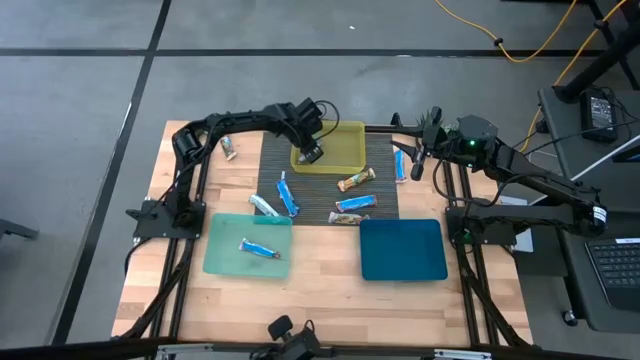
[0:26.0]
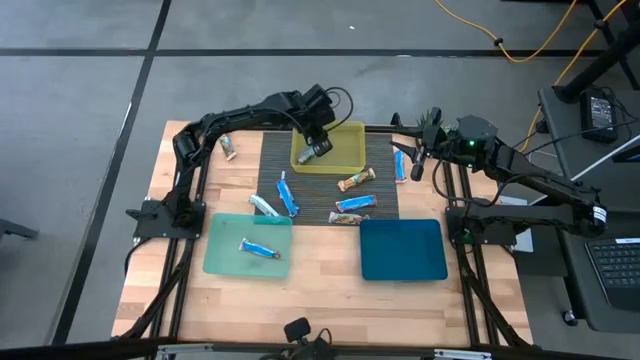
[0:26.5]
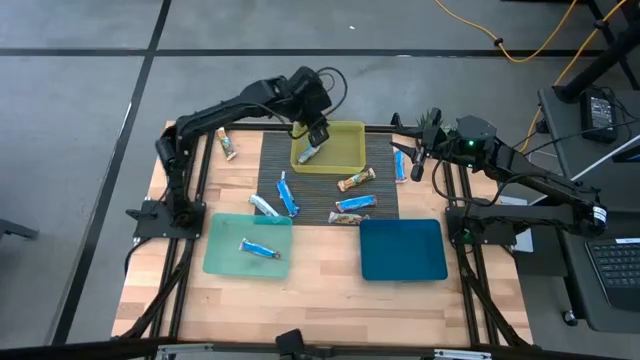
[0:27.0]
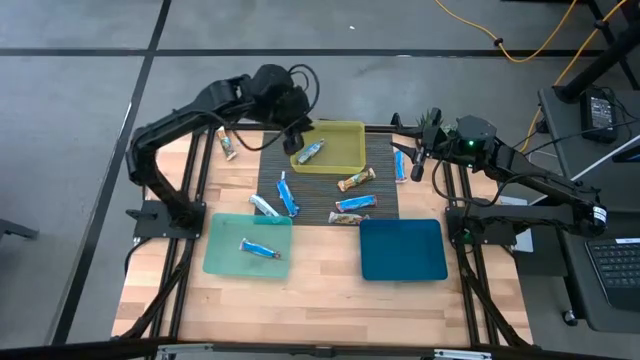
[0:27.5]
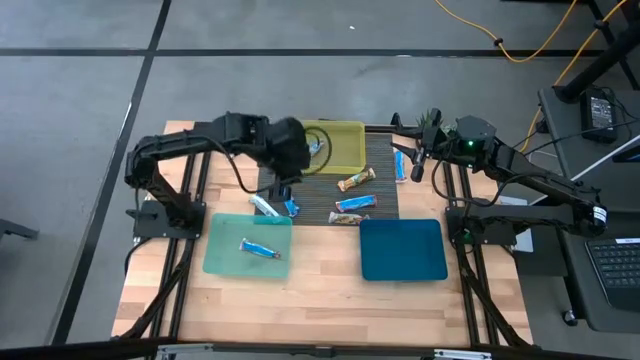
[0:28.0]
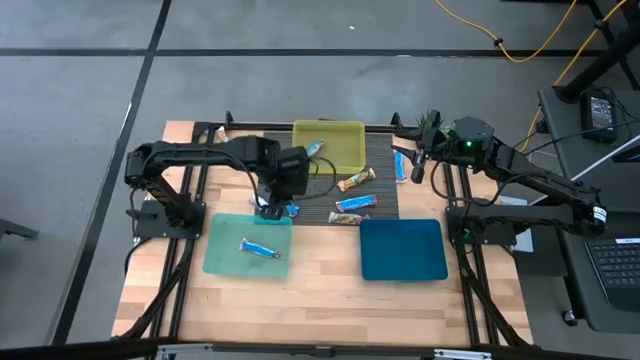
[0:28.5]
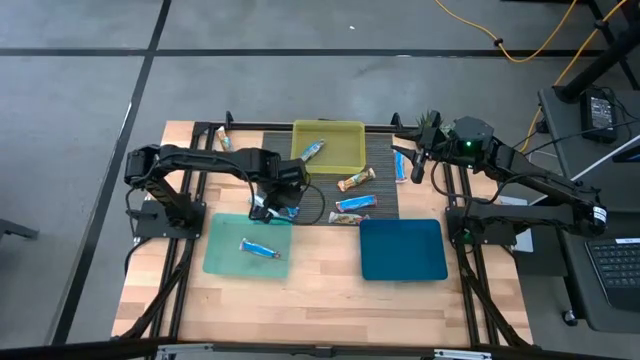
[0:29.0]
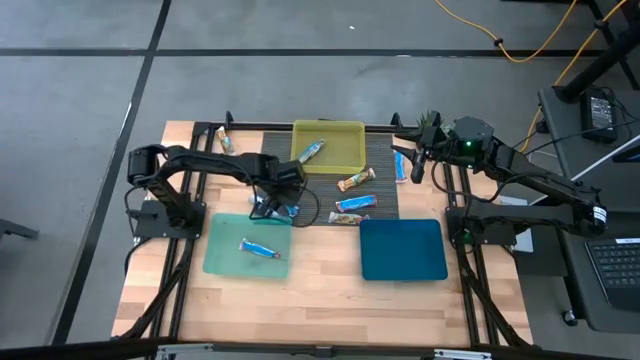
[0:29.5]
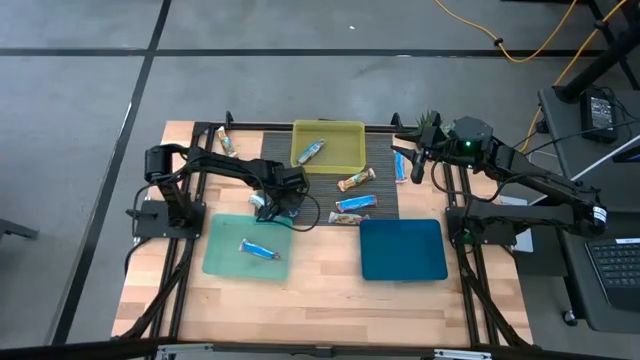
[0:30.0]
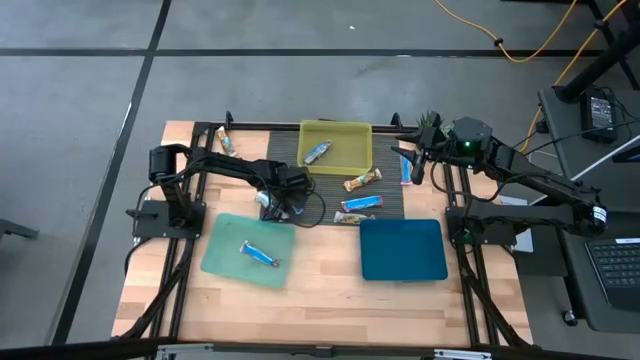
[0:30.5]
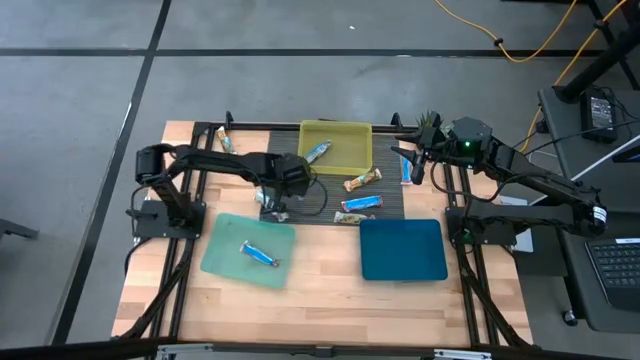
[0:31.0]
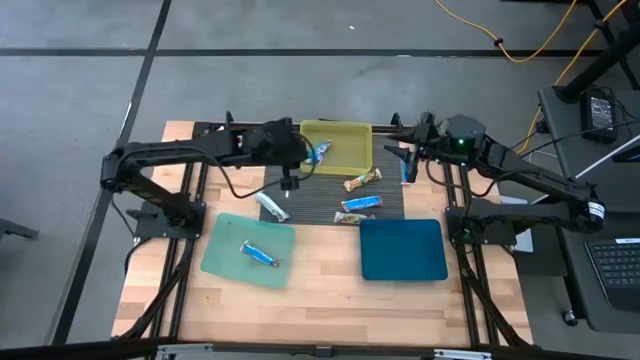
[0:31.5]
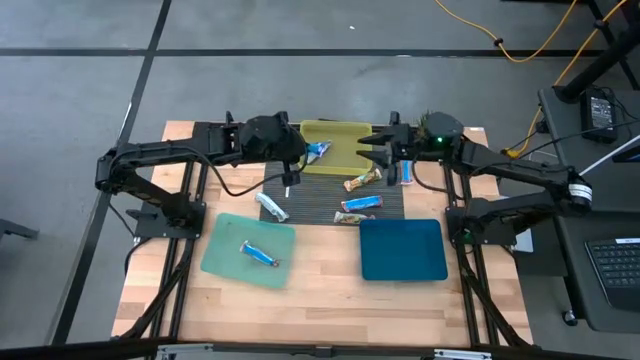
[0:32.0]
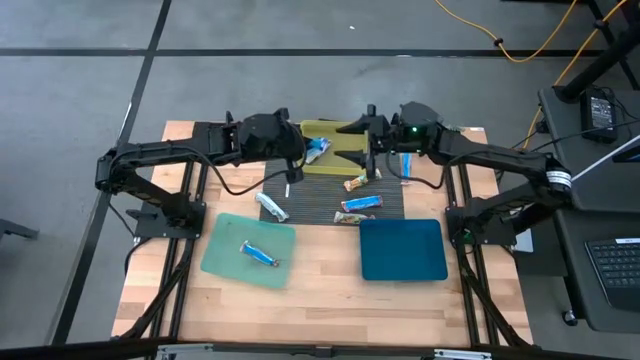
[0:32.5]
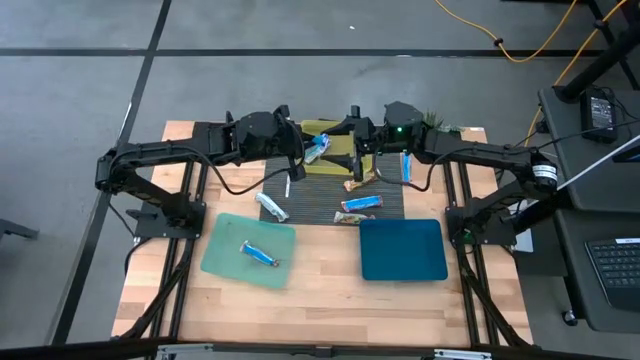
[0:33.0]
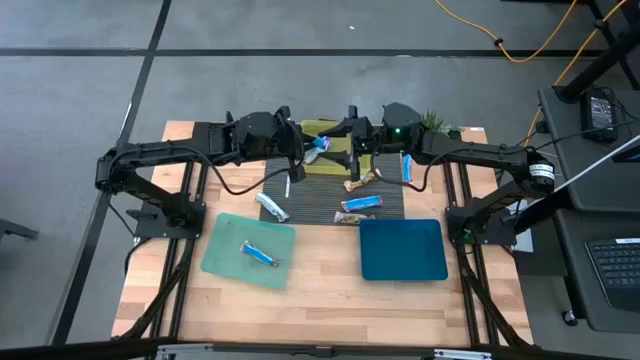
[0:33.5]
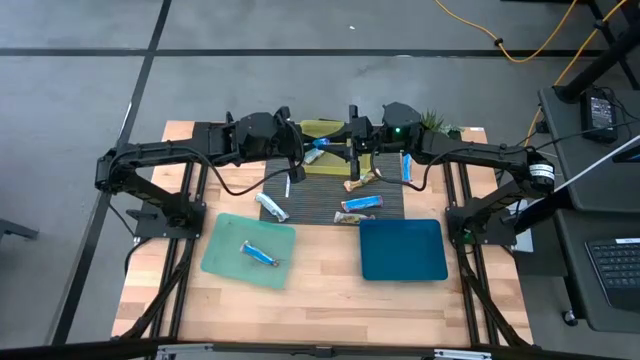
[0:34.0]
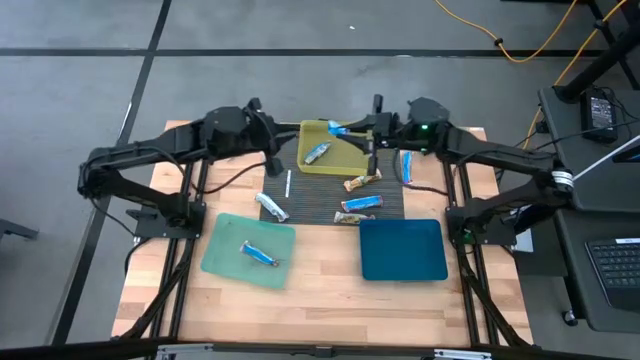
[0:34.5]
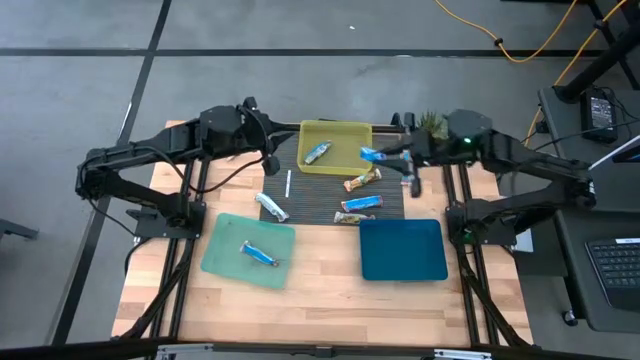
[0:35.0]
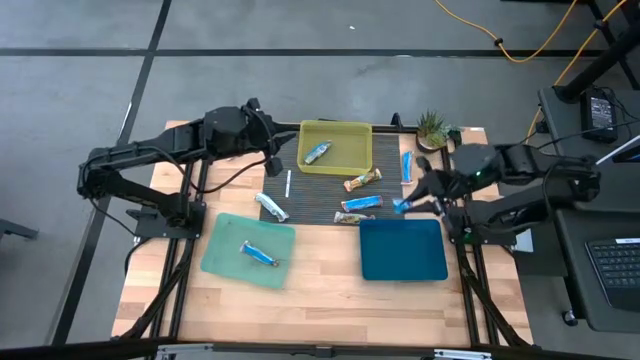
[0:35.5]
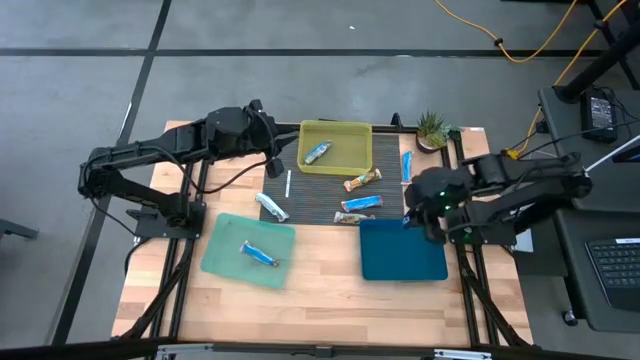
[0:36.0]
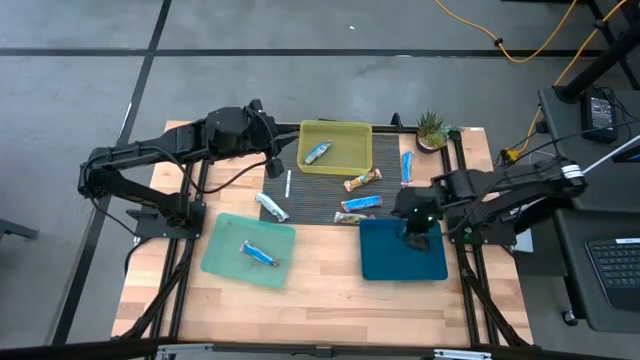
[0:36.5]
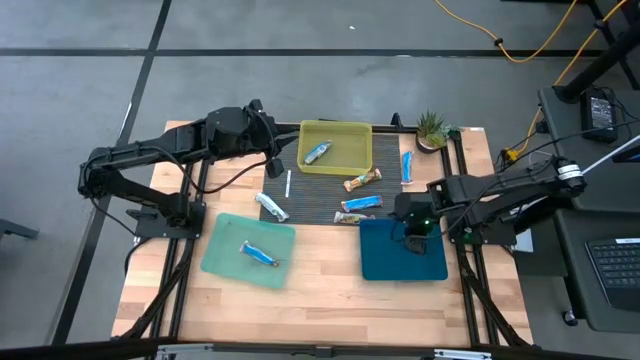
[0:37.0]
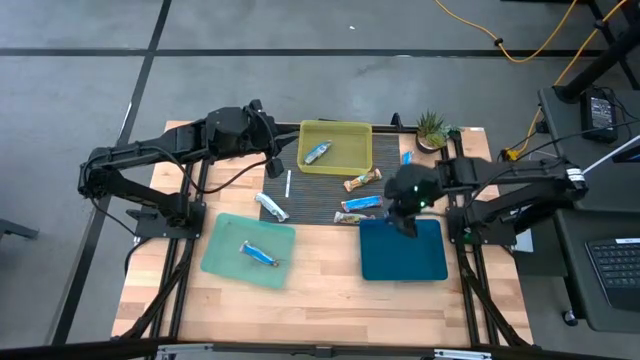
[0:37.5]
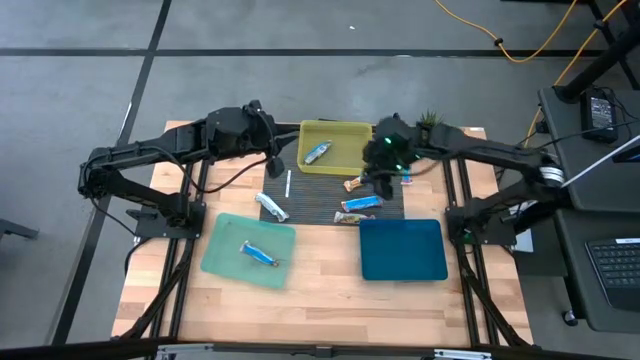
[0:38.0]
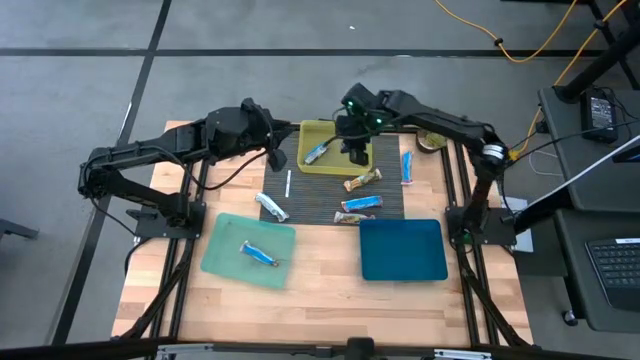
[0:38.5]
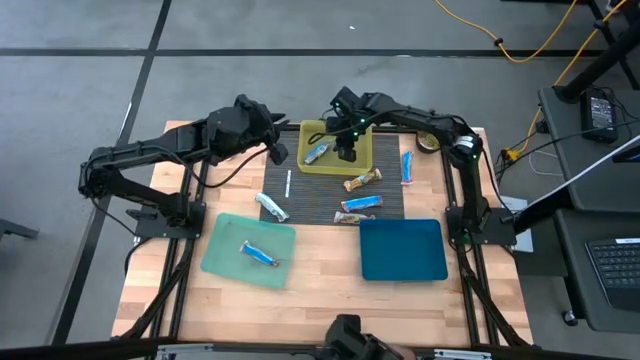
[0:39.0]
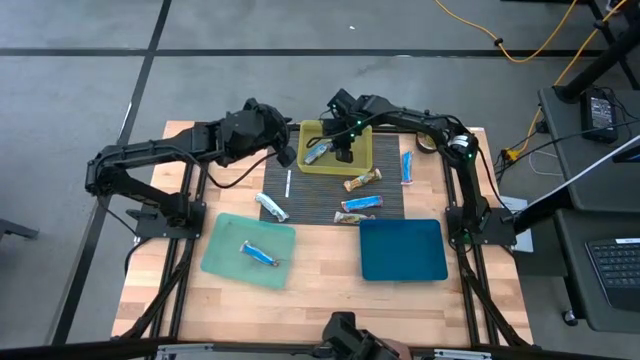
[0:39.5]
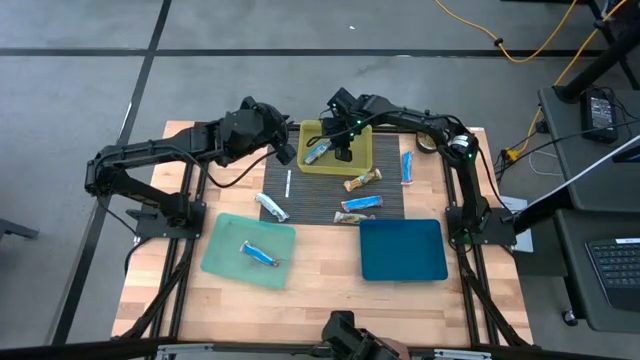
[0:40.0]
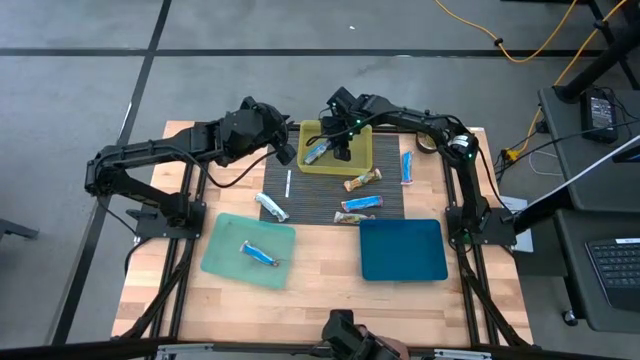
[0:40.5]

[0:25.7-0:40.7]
Task: Pick and place Granola Bars by type
Put the blue granola bar into the yellow bin

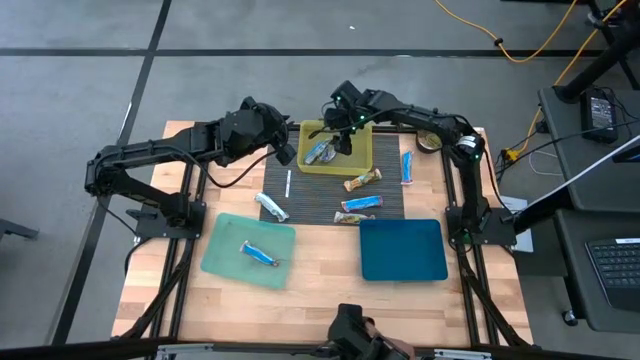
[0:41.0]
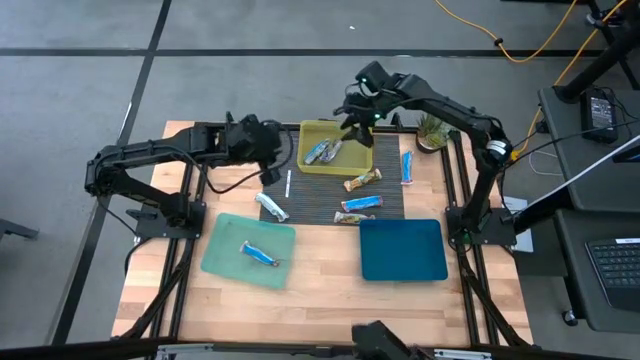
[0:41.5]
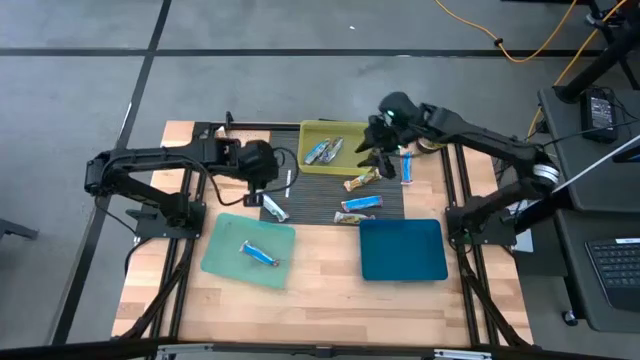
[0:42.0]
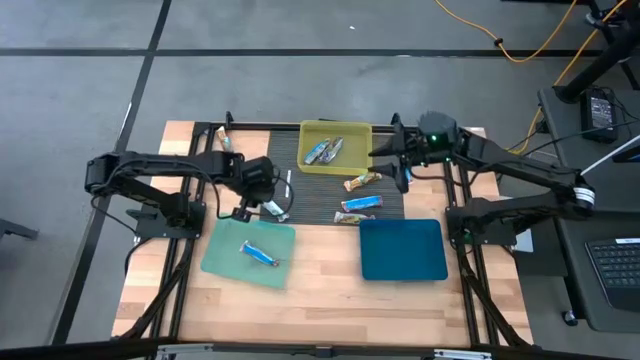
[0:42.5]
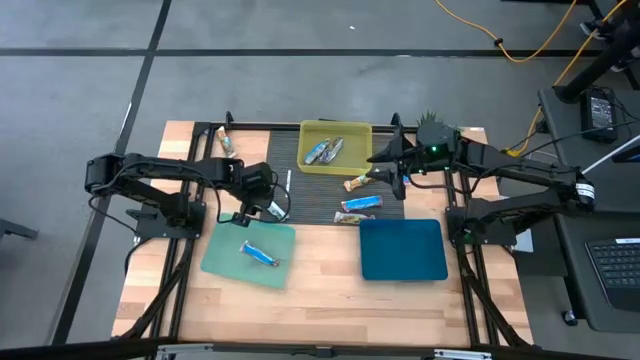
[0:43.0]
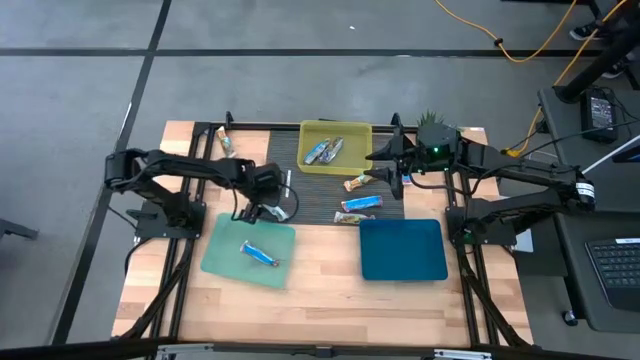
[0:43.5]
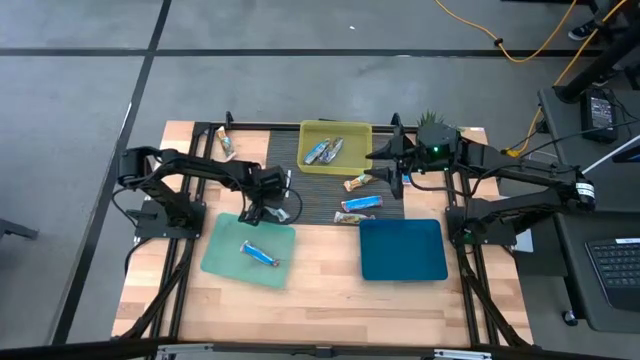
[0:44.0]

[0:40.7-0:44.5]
Put the yellow granola bar into the blue bin

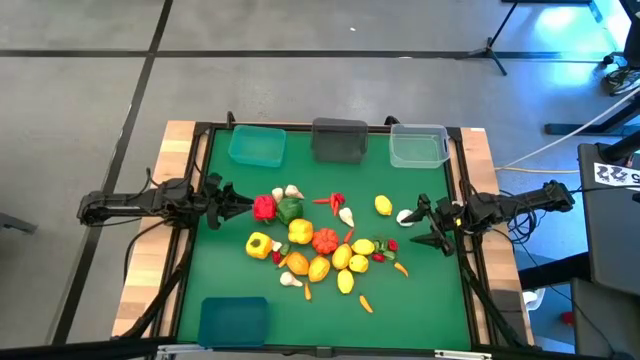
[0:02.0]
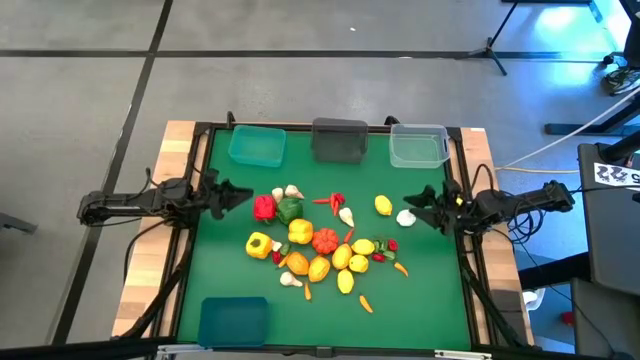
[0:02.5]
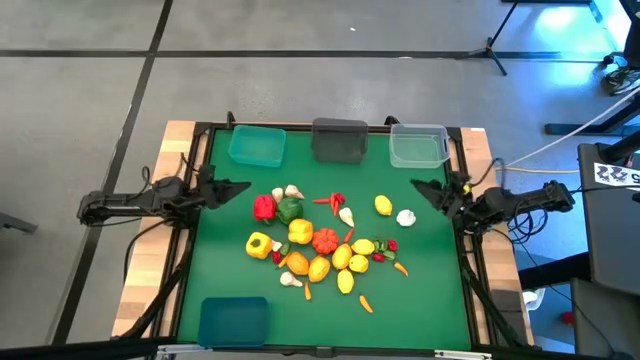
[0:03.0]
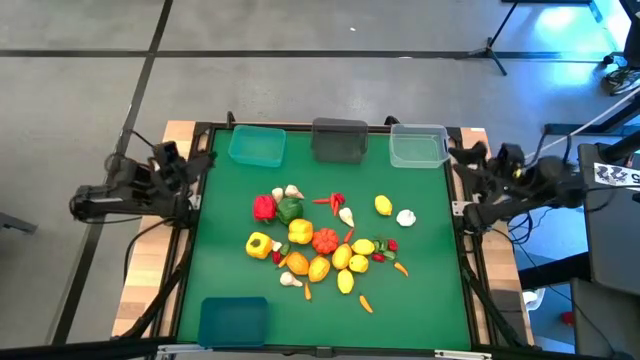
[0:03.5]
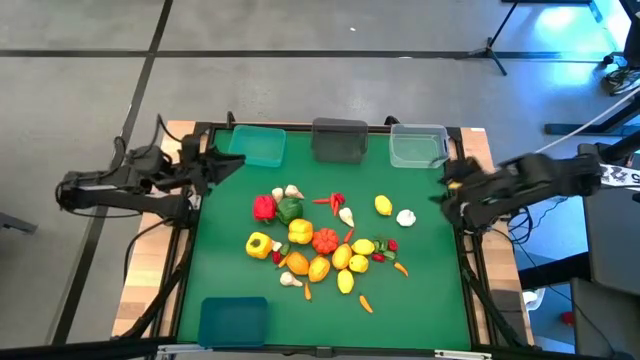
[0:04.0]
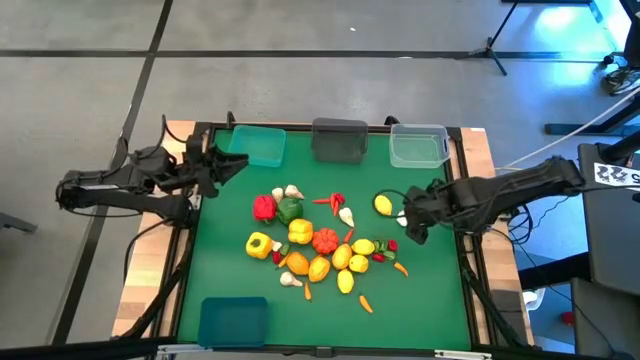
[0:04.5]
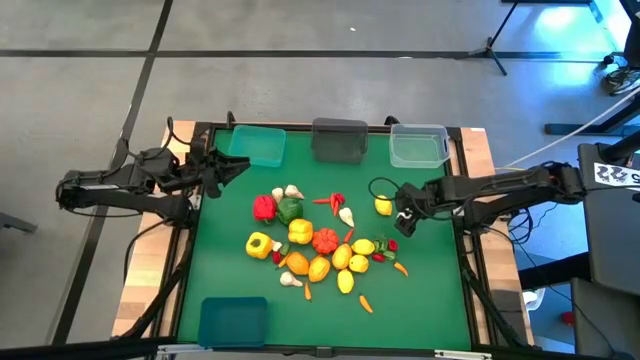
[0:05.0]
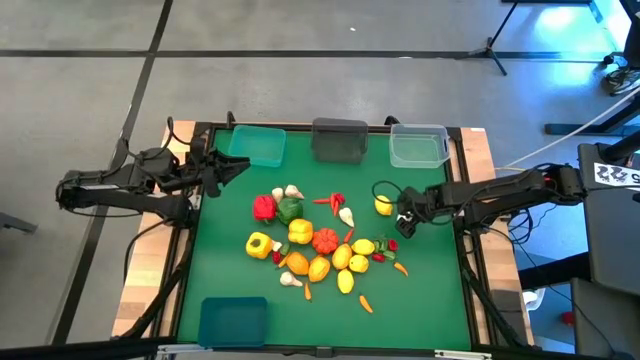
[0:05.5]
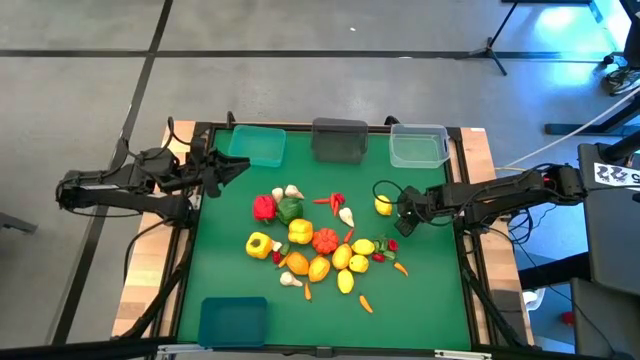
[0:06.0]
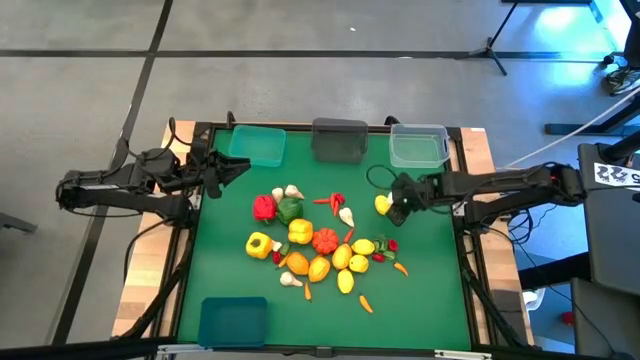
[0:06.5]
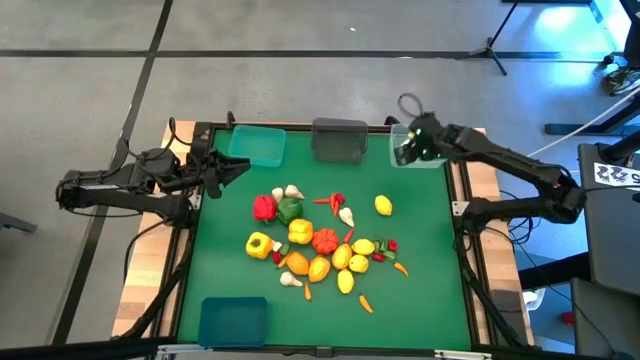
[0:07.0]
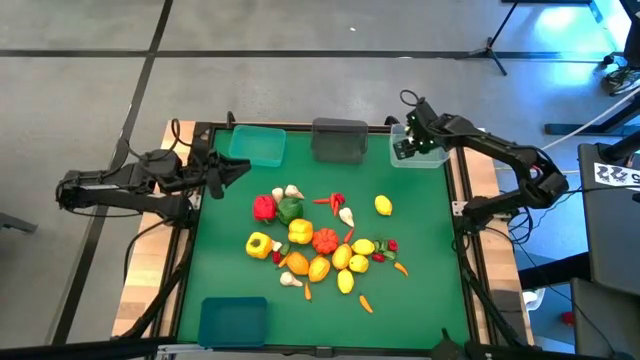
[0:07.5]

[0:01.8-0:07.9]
Task: Sort produce into baskets
Put the white garlic into the transparent bin
